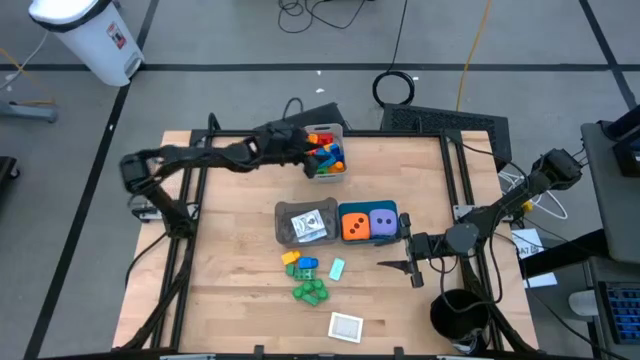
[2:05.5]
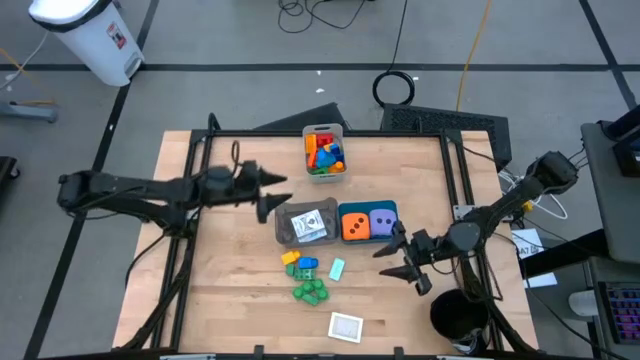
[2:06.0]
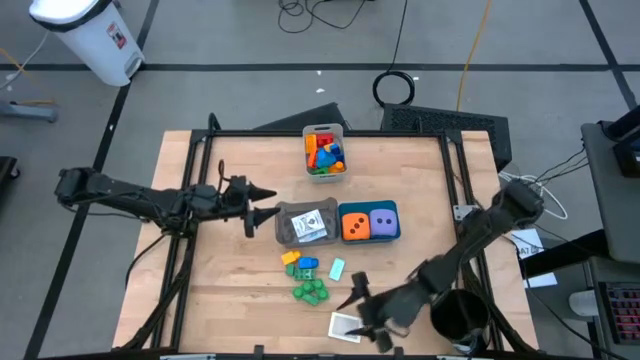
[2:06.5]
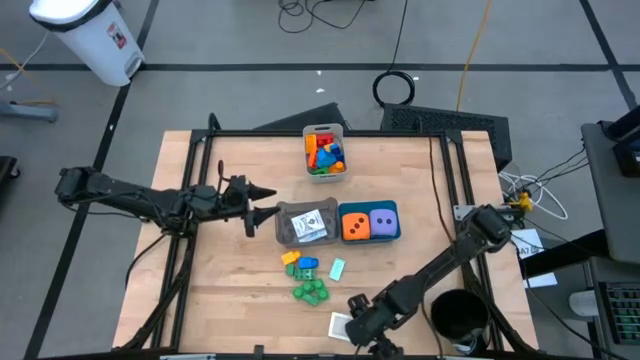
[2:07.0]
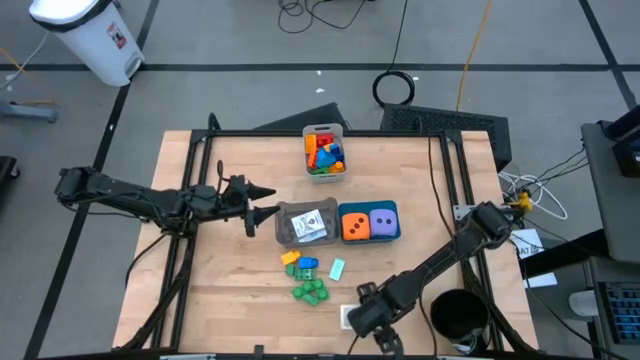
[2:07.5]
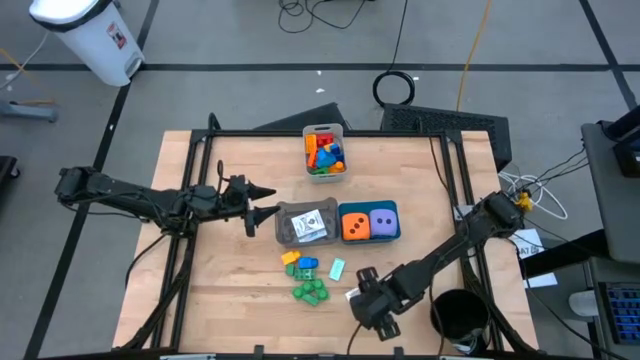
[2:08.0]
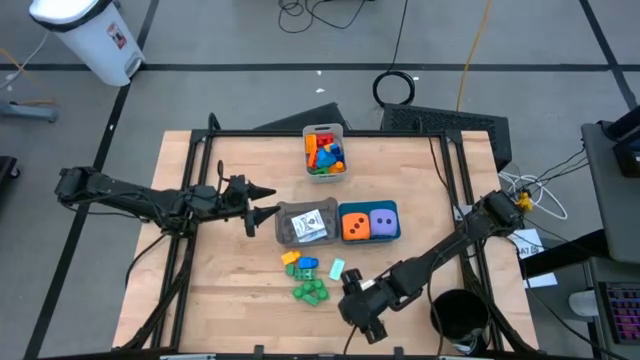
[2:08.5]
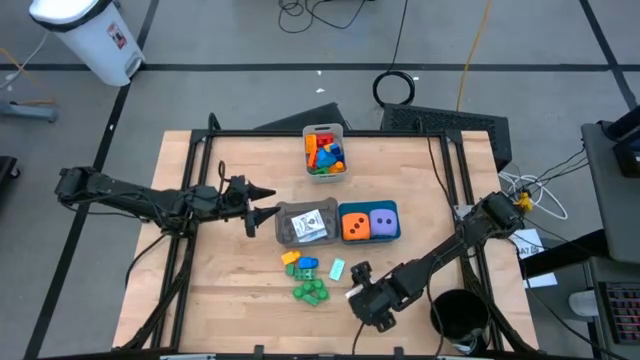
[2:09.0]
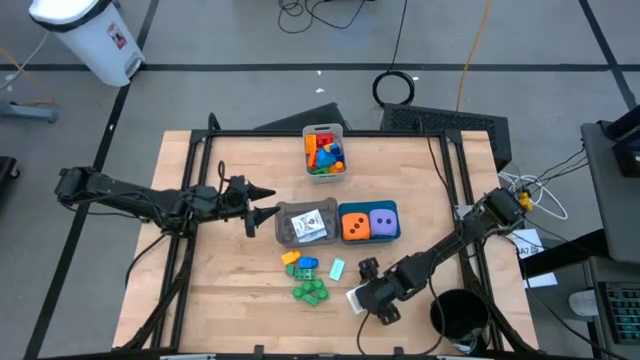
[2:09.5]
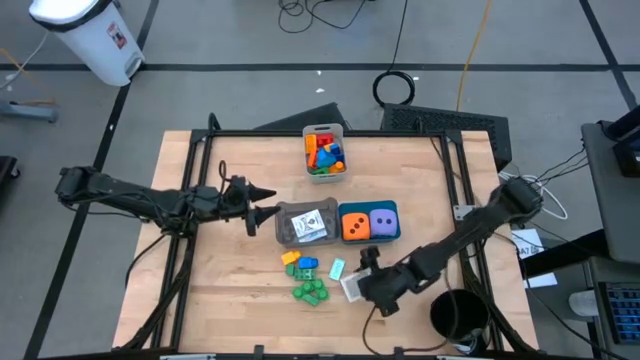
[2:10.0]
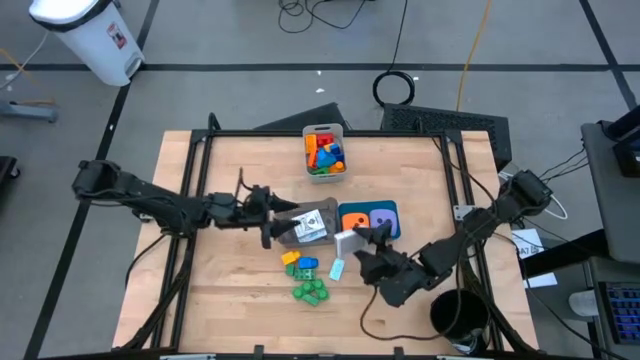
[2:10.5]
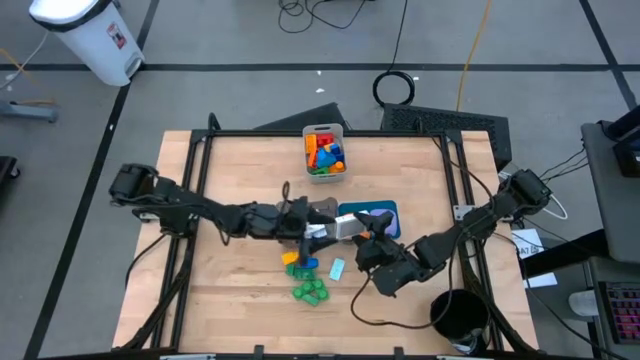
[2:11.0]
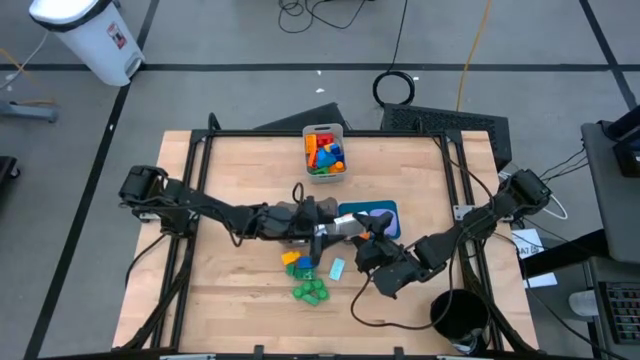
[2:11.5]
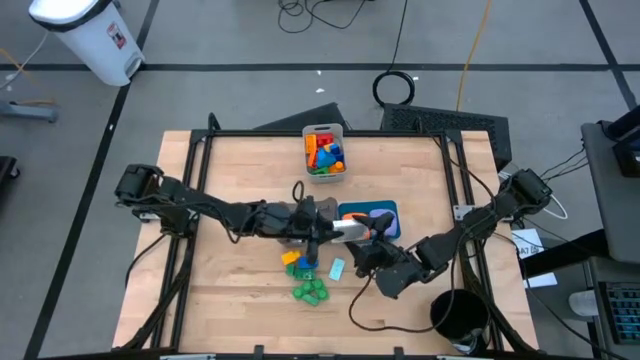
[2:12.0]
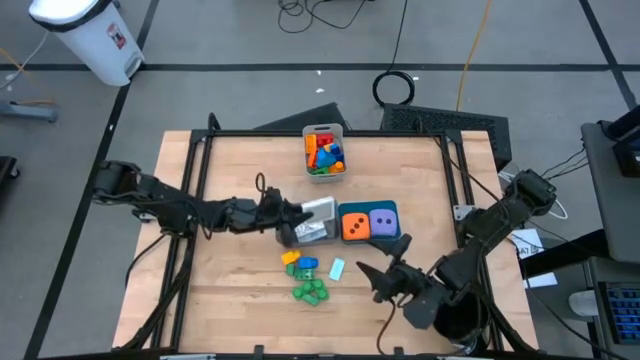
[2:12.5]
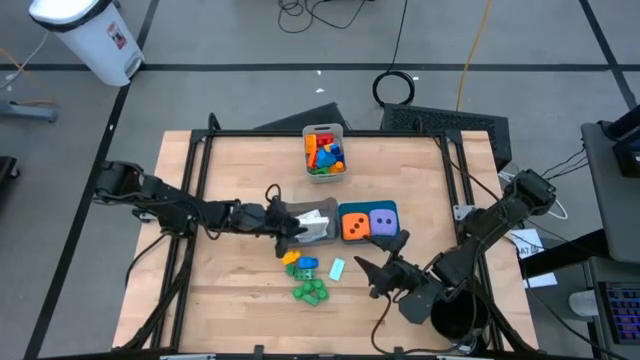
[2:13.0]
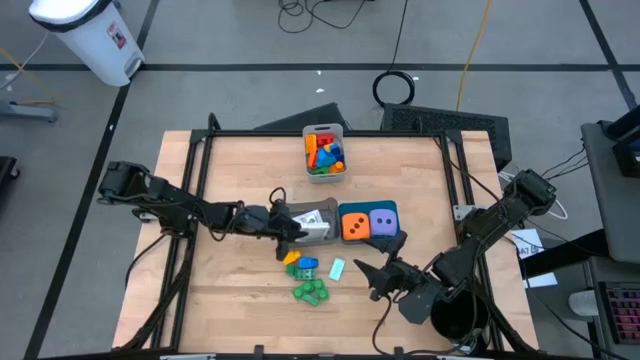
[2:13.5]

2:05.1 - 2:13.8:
Task: Pick & Place Toys
Put the brown deck of cards into the black bin

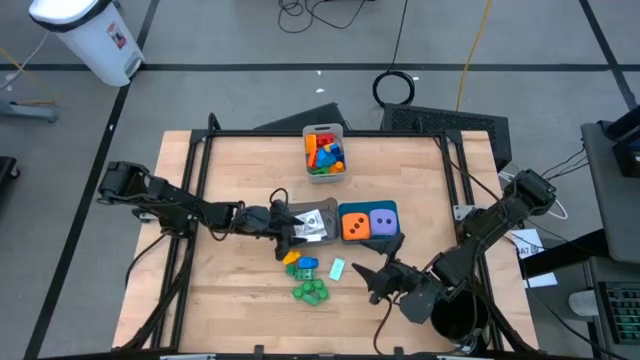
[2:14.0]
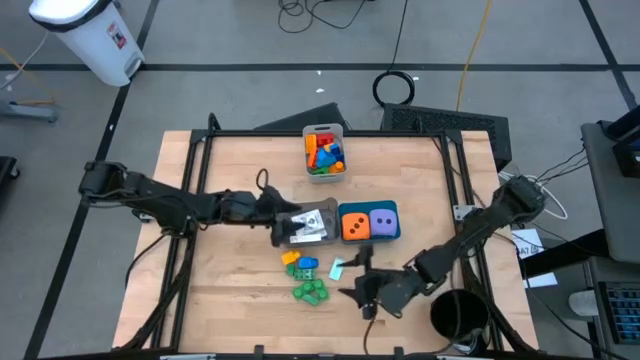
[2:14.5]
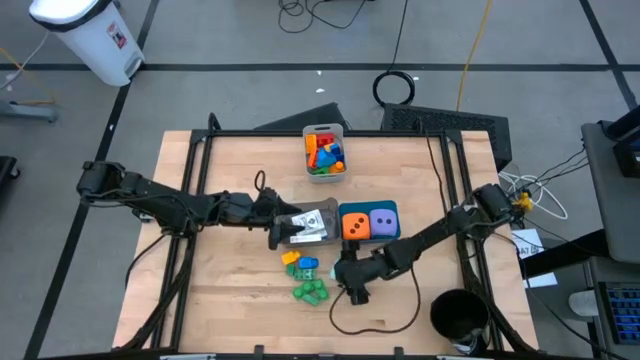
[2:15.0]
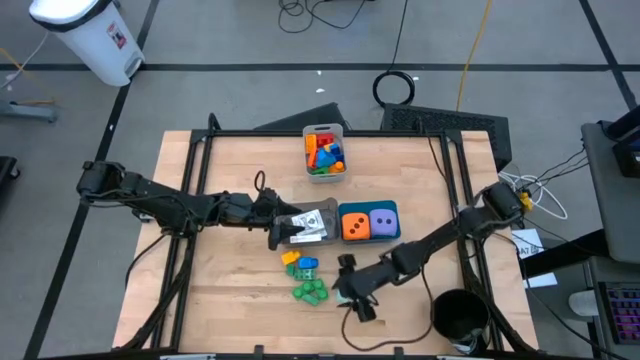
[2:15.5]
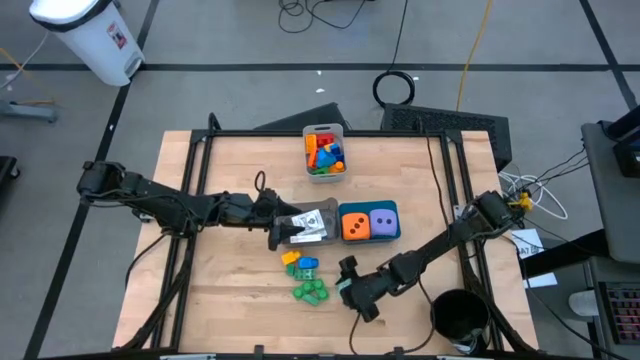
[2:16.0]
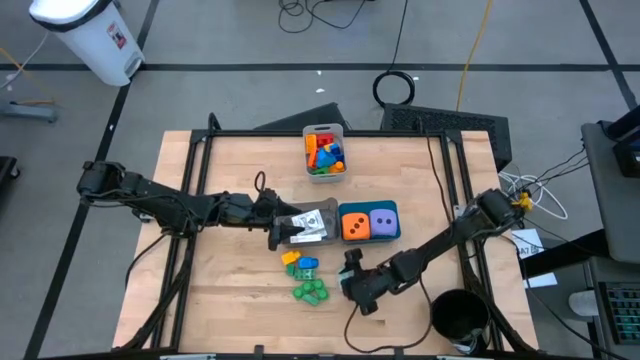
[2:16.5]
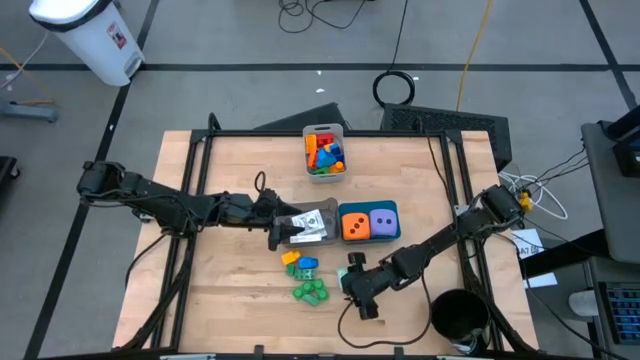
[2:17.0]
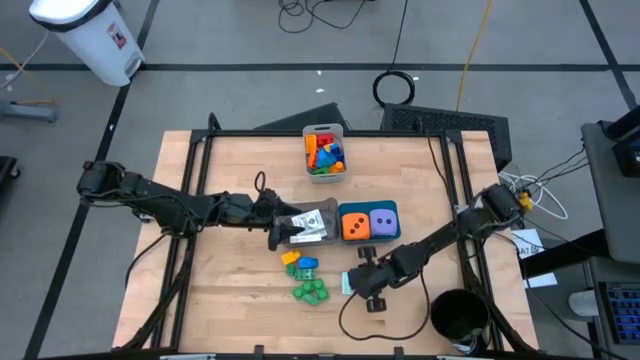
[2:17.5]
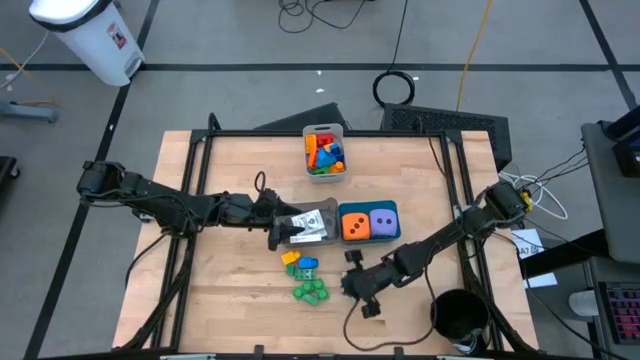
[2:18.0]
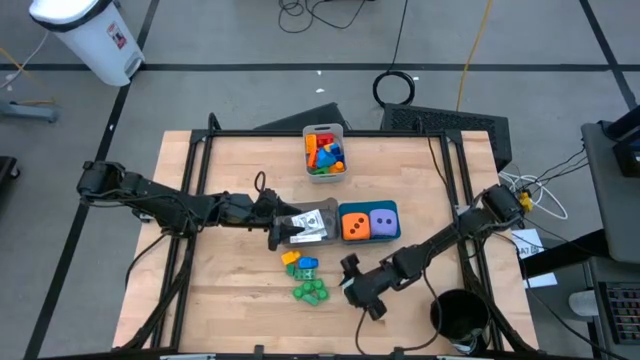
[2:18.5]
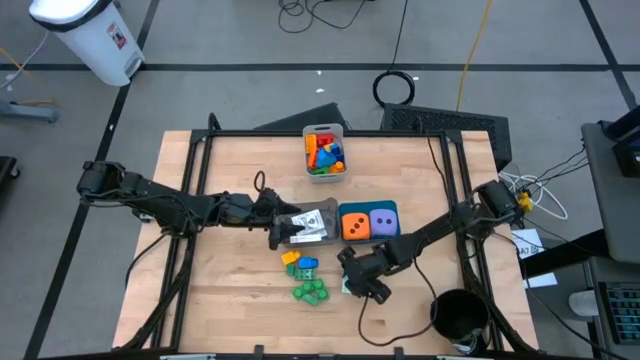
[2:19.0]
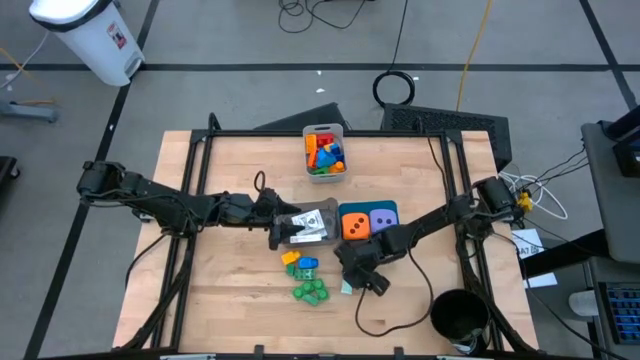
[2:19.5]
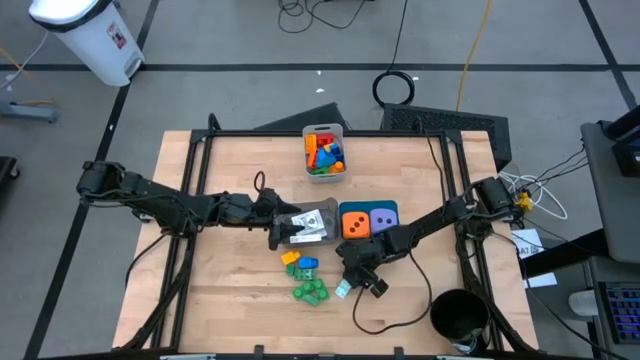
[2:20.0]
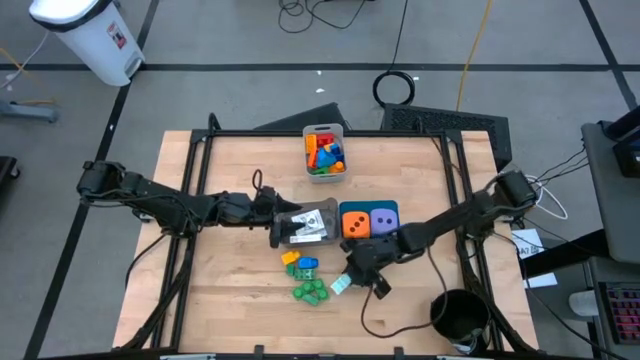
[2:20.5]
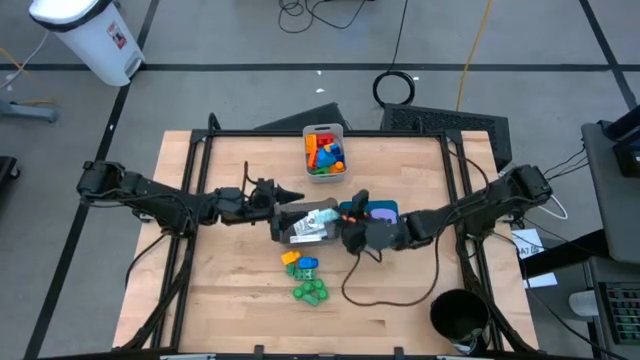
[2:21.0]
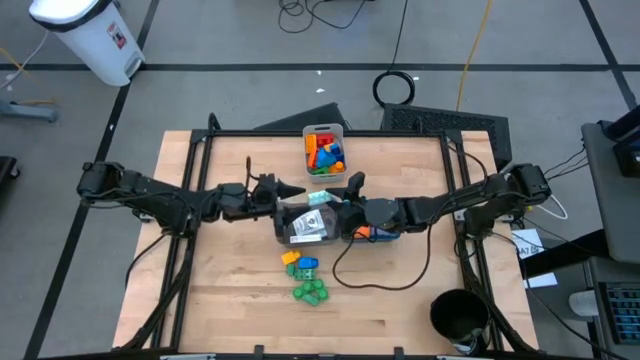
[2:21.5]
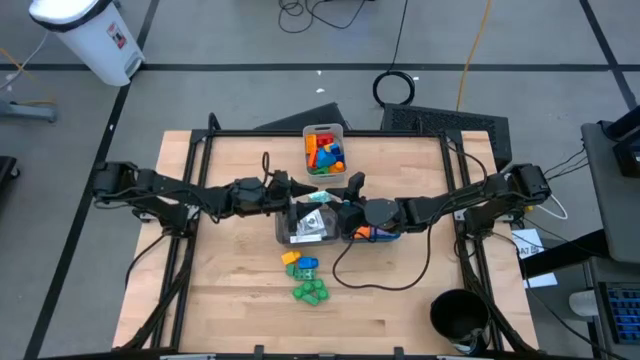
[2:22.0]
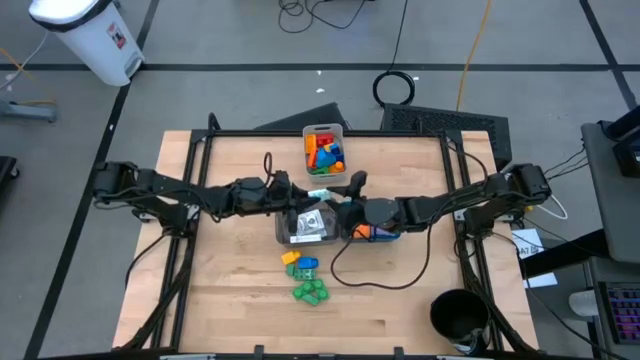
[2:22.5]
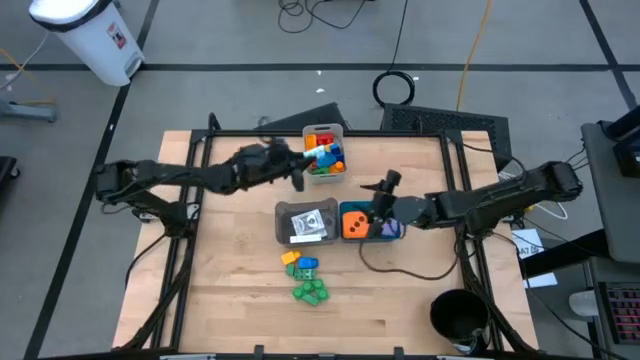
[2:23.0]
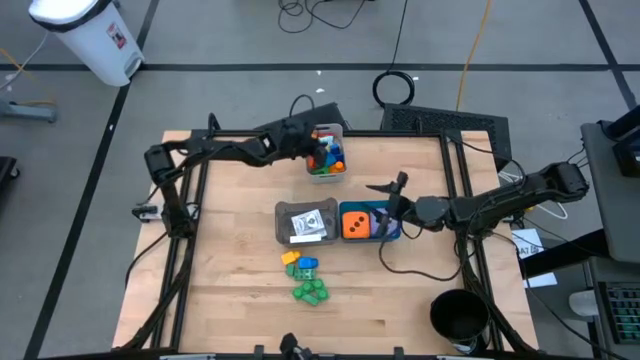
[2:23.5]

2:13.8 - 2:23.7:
Put the light blue game piece into the gray bin

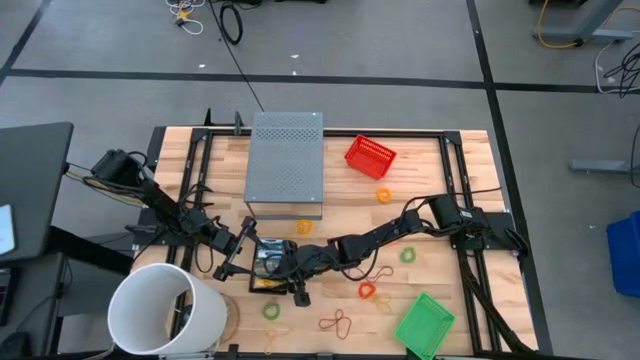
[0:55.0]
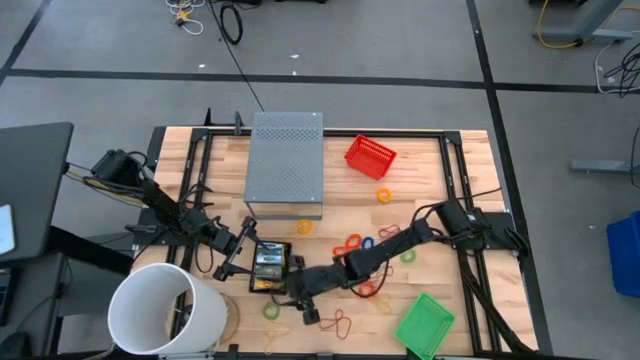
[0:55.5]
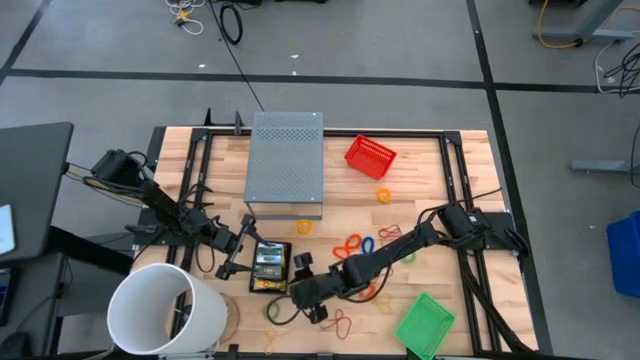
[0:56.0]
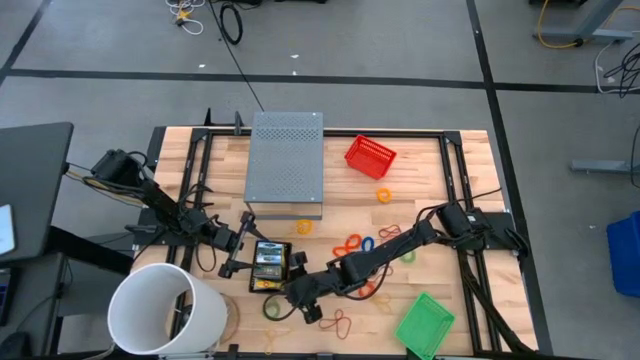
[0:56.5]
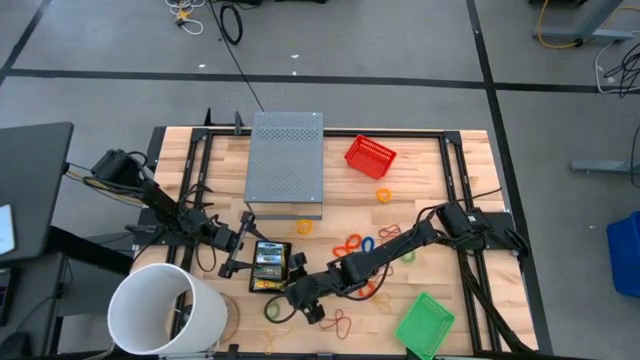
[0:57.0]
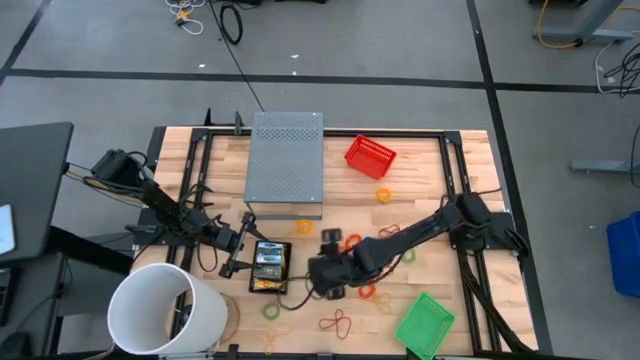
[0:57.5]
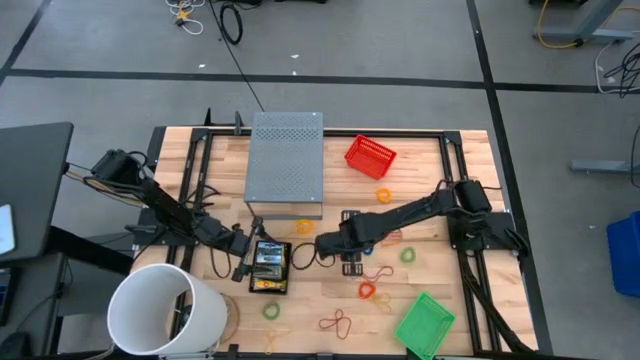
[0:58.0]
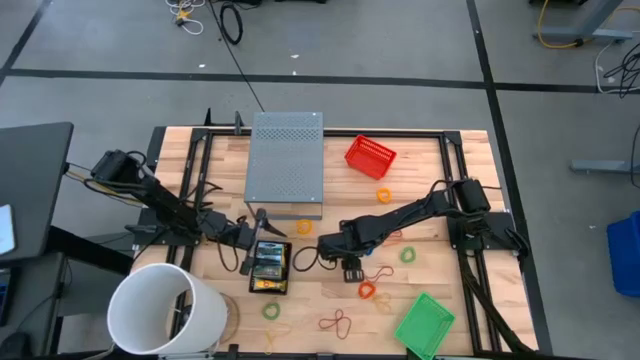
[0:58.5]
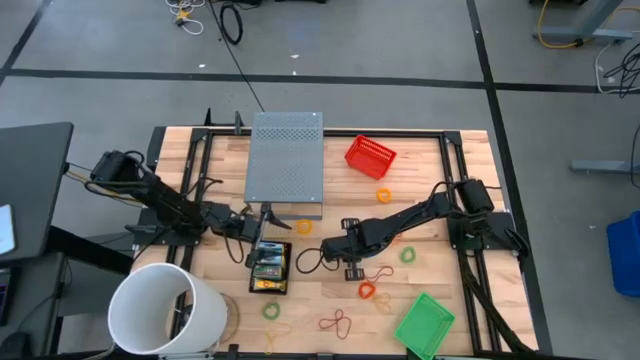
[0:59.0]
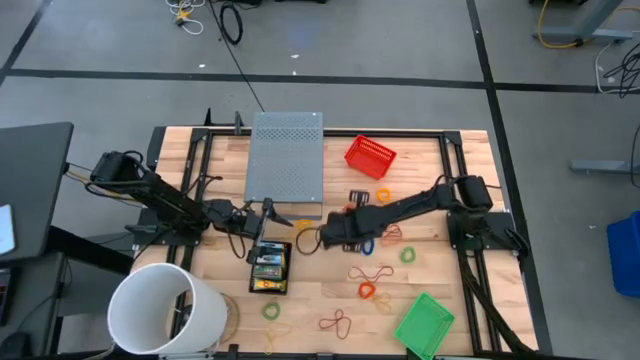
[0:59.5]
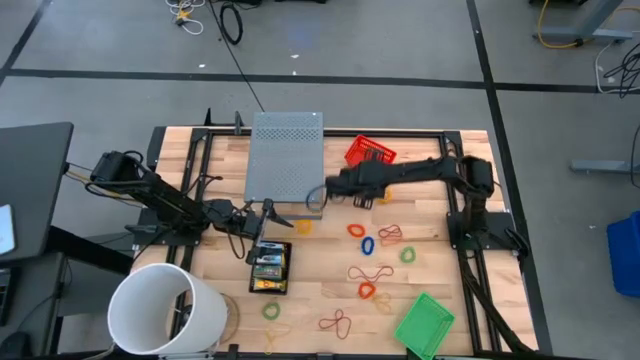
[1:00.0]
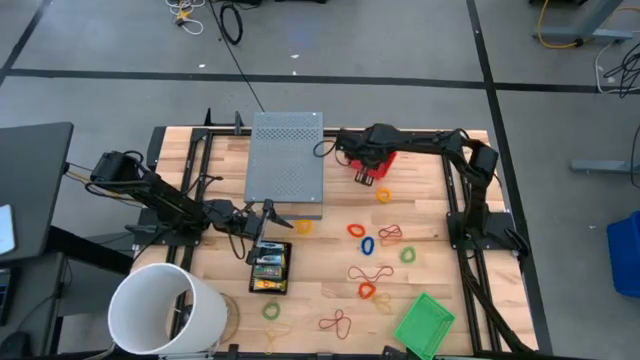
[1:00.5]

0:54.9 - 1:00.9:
Task: Pick & Place Office Desk Supplies
Put the middle orange spring keychain into the red basket
